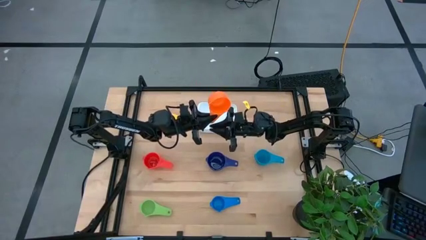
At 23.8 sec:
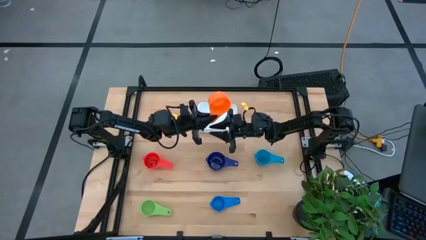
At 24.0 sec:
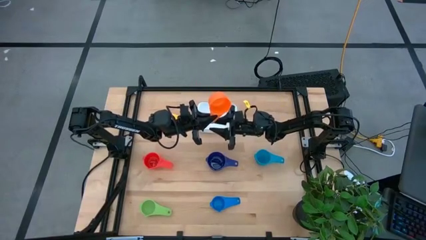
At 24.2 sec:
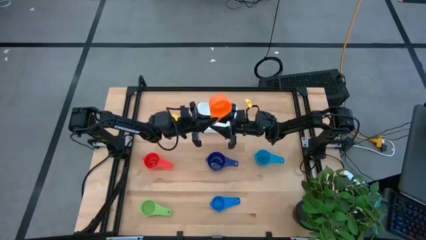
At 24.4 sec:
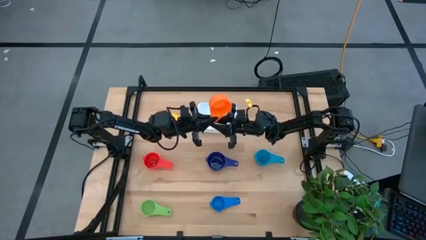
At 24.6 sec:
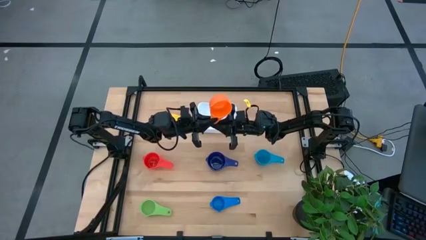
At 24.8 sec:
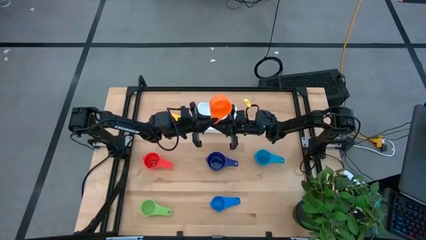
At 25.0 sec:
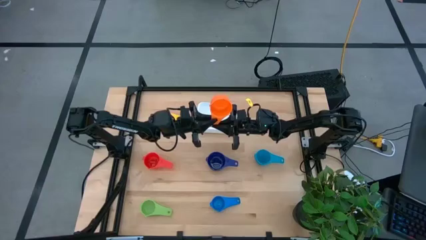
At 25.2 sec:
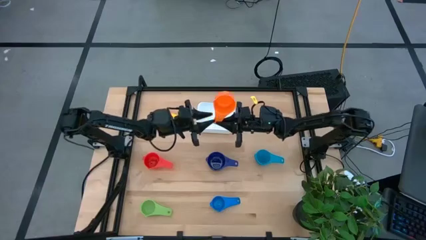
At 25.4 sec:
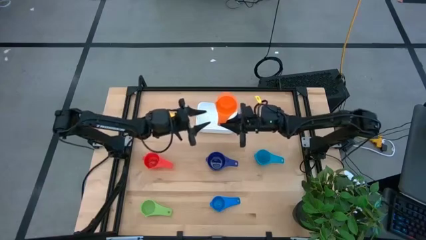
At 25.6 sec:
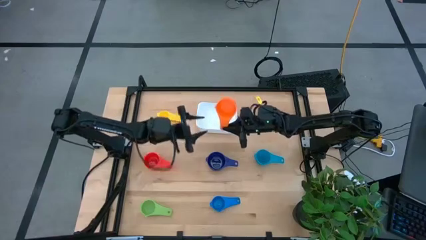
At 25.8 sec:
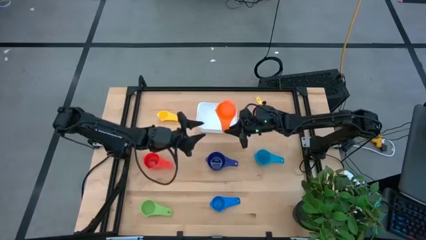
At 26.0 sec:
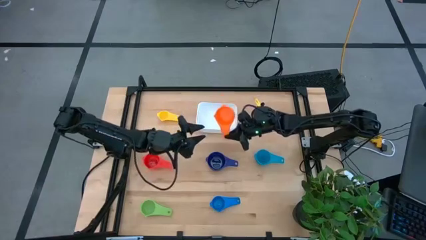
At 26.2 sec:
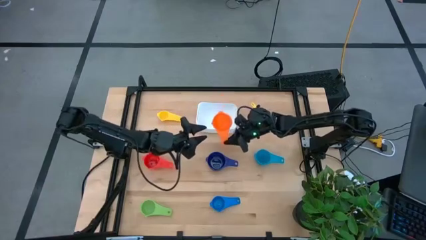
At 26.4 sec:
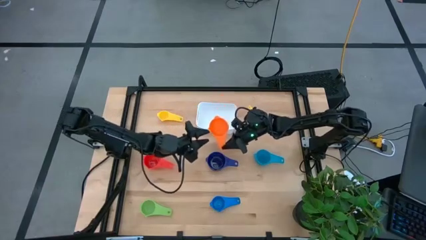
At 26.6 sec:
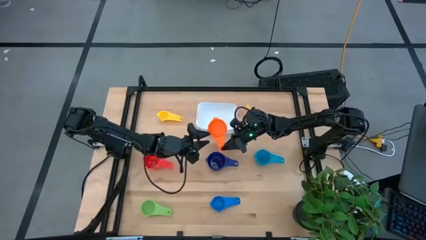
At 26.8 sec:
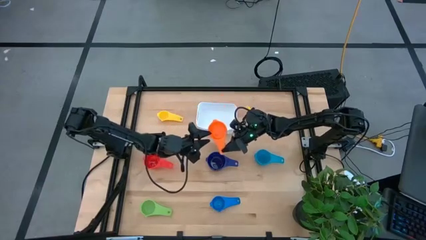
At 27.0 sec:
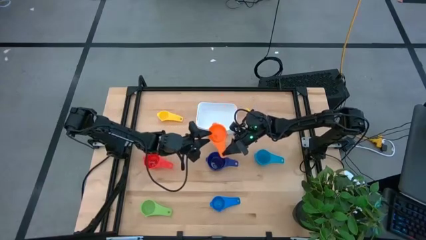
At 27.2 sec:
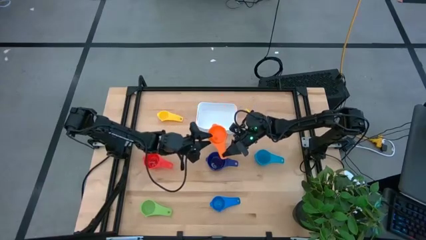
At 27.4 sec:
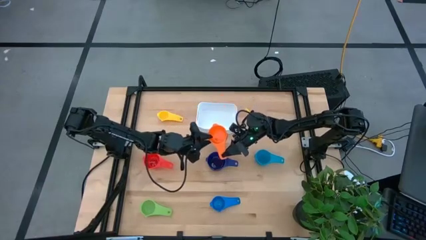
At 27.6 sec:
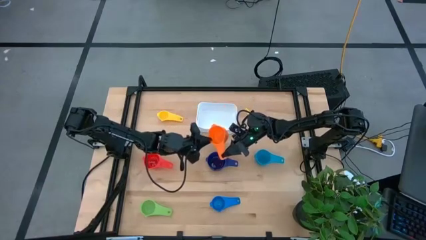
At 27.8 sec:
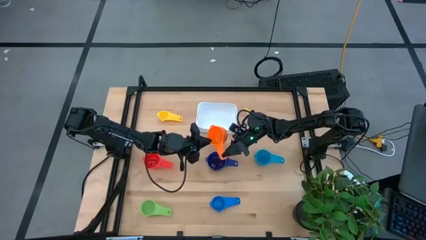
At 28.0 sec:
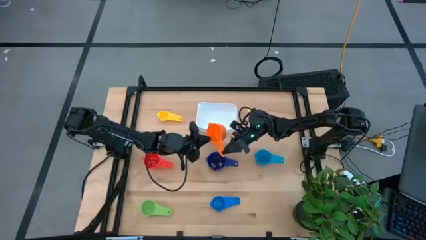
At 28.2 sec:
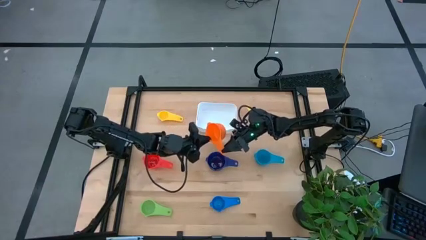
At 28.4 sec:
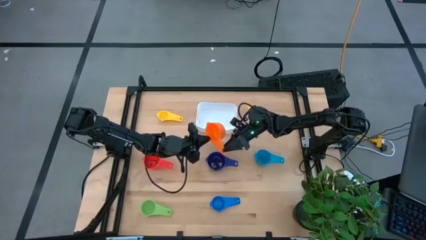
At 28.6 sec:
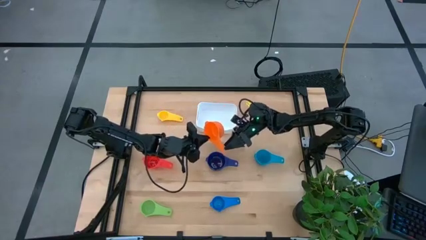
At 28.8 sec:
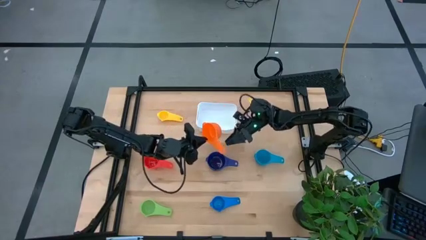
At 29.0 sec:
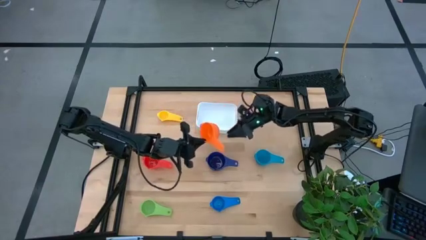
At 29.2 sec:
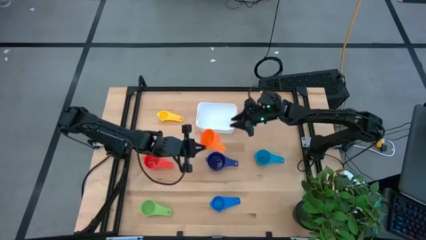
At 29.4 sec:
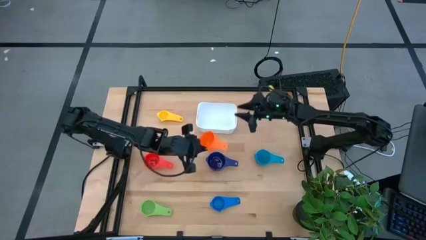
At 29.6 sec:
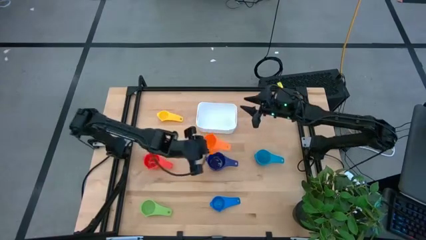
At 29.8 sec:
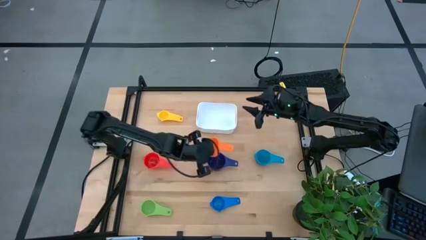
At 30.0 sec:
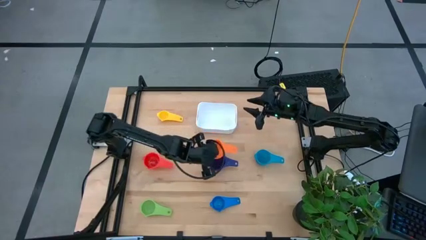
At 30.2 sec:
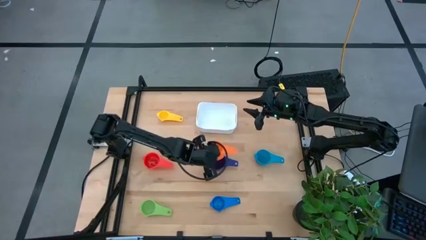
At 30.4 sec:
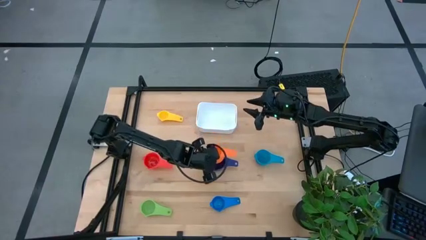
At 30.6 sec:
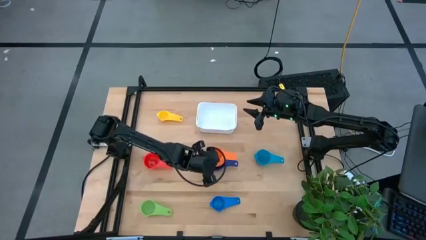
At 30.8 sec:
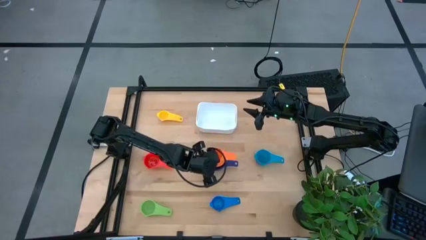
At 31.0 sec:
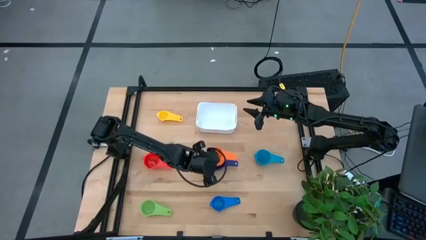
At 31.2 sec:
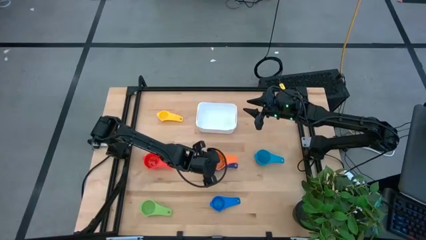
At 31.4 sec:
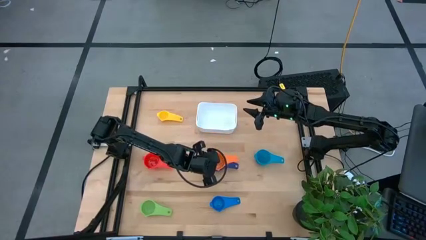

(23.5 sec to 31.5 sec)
Task: Nest measuring cups in basket
Stack the orange measuring cup on top of the purple measuring cup

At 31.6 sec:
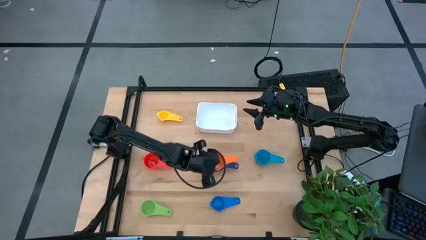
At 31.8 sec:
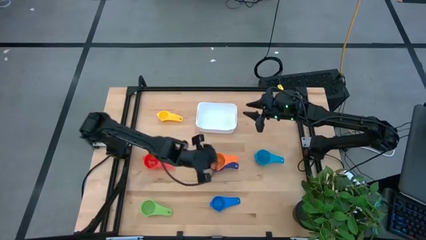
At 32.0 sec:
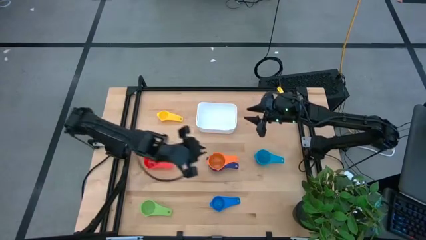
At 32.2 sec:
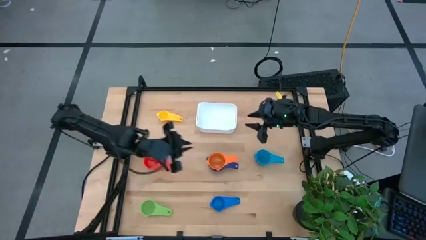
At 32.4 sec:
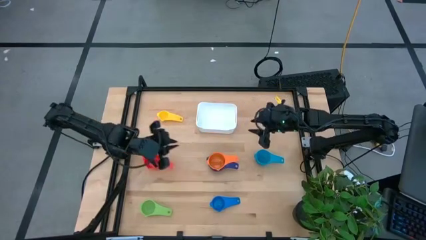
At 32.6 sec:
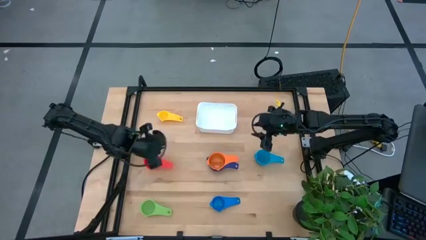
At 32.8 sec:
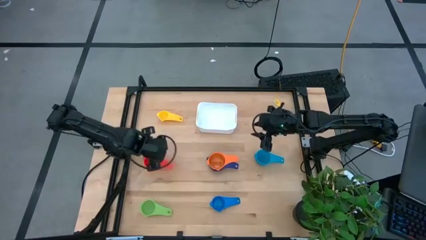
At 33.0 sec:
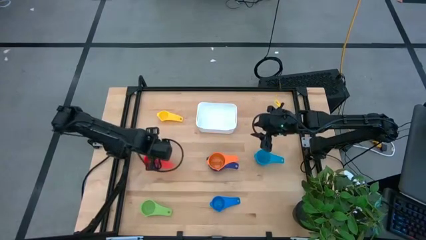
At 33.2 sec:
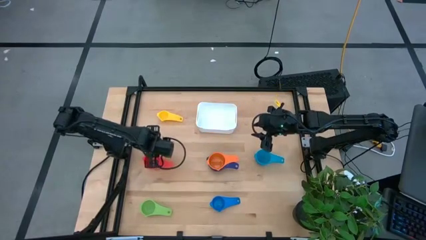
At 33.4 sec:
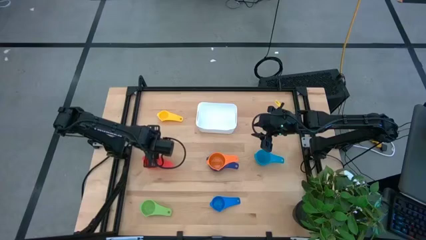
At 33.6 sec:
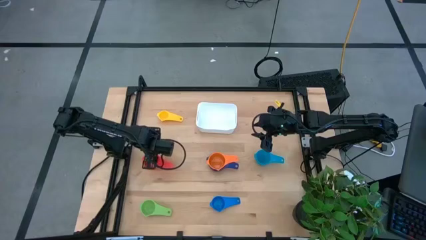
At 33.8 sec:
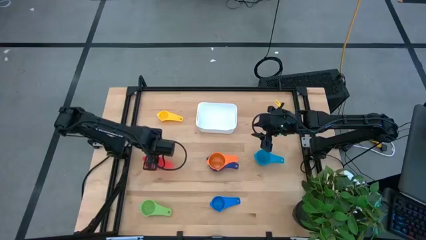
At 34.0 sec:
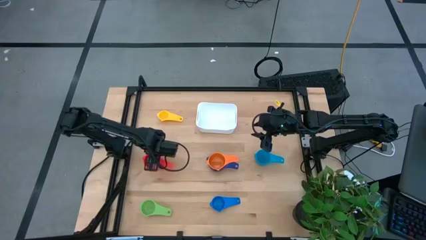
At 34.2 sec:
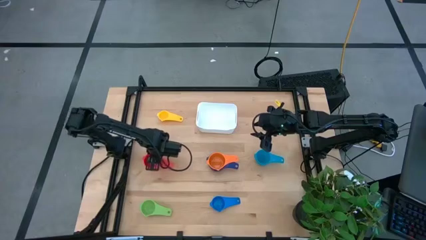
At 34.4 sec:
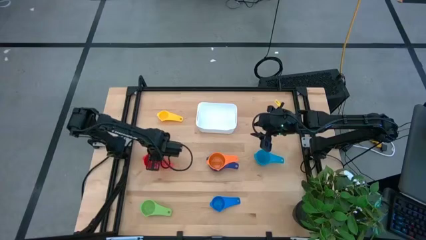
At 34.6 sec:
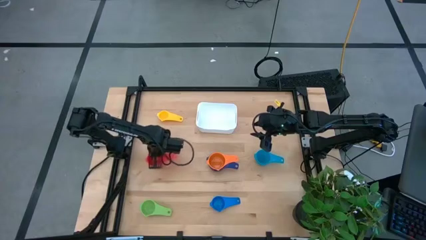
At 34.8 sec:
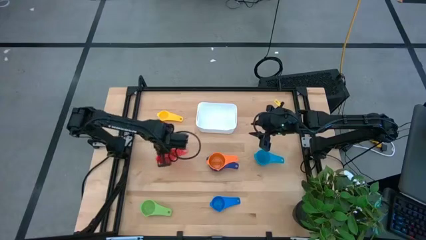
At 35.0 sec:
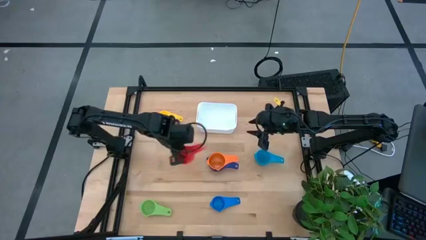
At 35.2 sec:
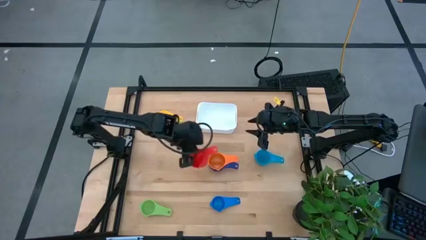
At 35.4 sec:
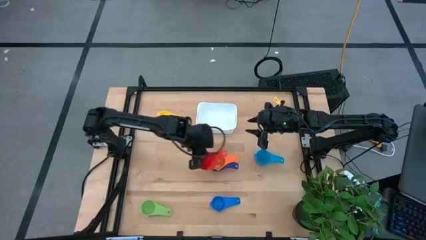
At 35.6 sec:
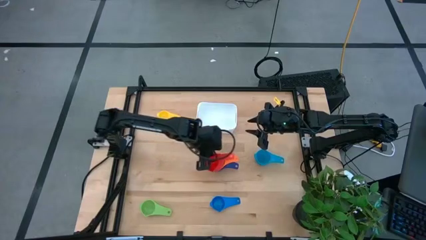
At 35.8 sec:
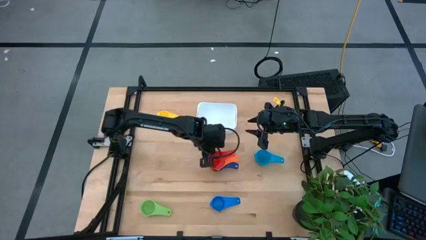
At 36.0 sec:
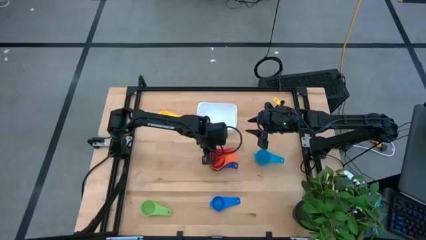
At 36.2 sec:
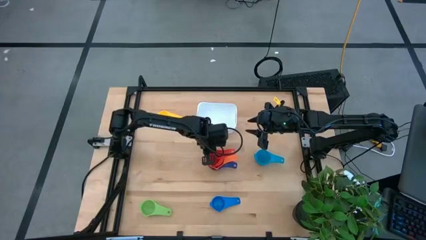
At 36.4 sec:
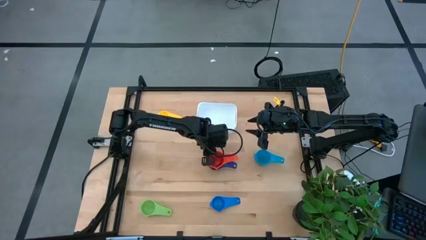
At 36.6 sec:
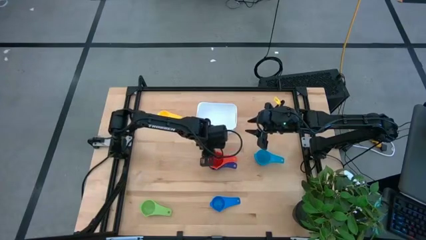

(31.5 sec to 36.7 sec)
Stack the red measuring cup on top of the orange measuring cup

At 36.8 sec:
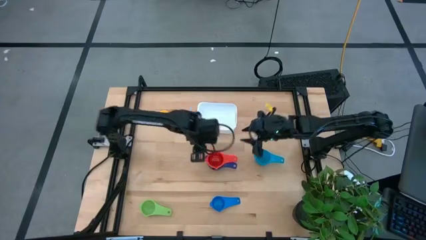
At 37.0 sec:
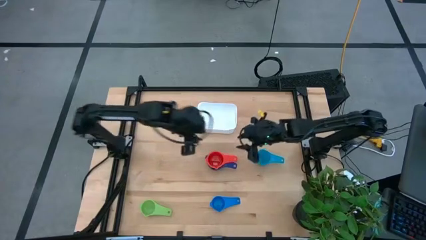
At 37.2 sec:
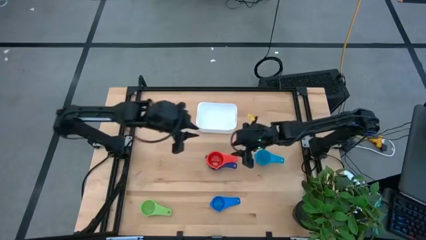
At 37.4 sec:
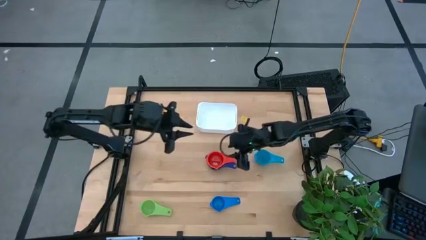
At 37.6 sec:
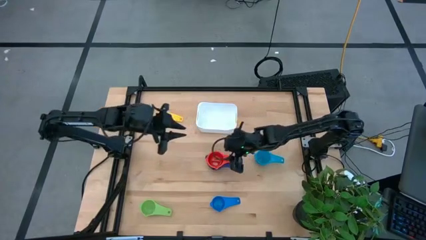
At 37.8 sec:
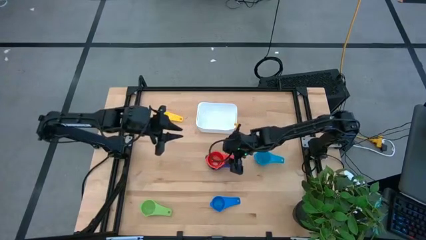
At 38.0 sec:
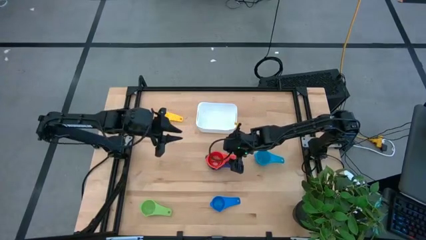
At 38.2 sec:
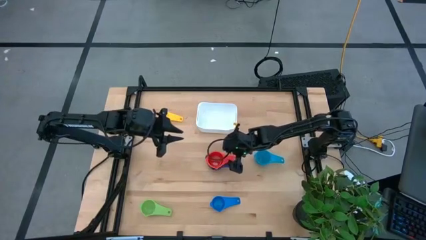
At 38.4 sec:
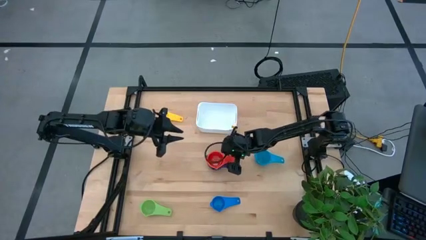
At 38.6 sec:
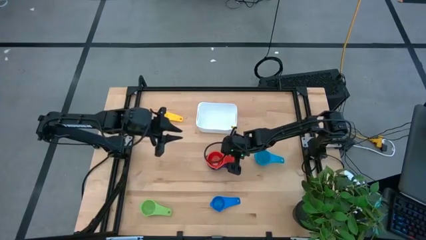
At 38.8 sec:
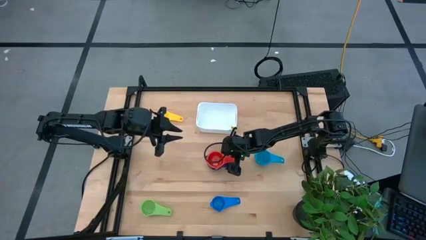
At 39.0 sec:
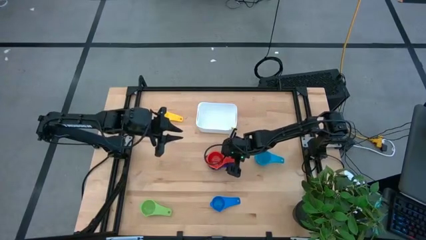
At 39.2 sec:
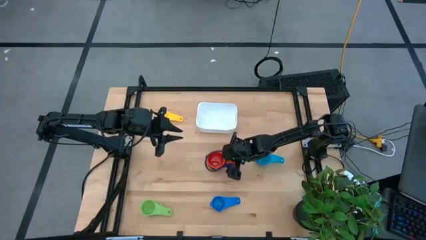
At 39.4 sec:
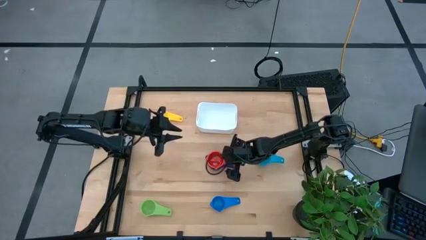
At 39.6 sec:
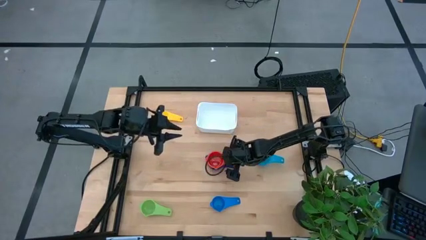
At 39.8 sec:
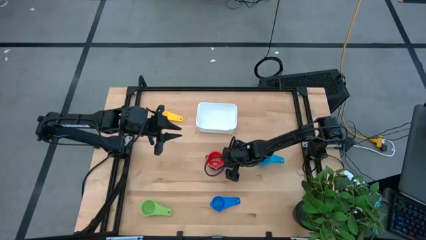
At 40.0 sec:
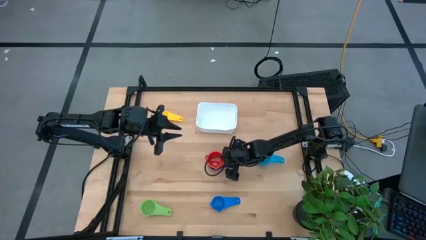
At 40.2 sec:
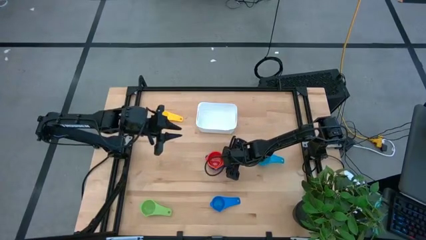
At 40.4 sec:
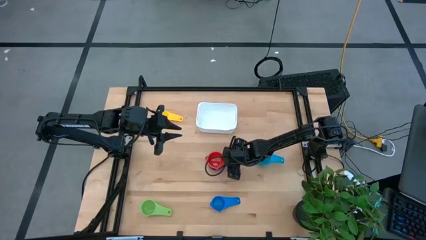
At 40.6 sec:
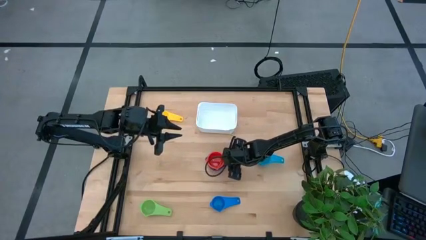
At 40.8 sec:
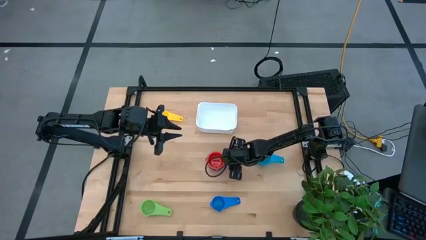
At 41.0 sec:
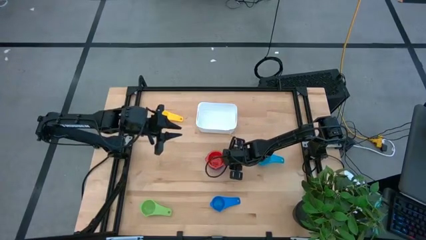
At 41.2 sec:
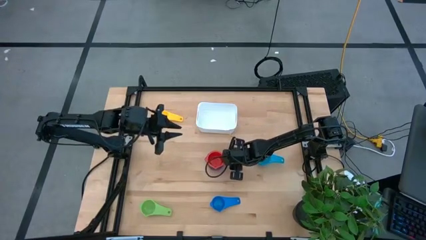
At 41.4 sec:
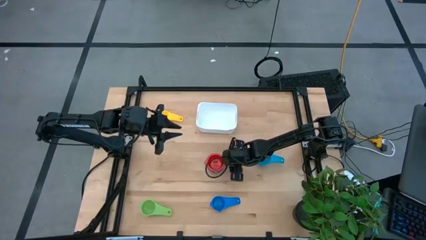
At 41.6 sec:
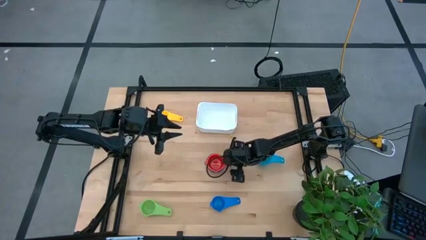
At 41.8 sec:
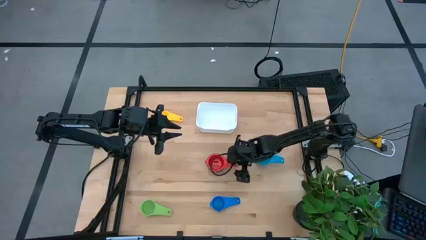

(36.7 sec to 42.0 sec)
Adjust the stack of measuring cups
